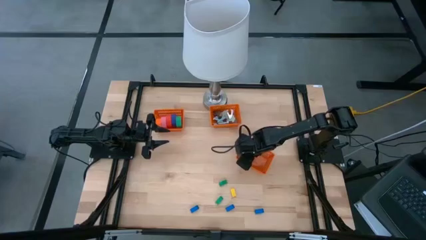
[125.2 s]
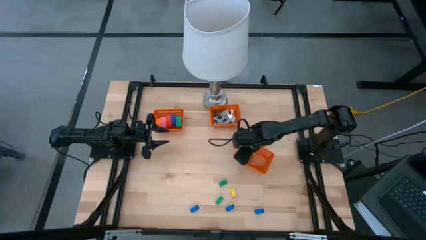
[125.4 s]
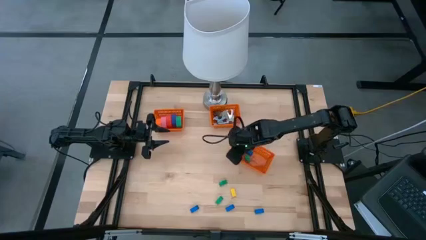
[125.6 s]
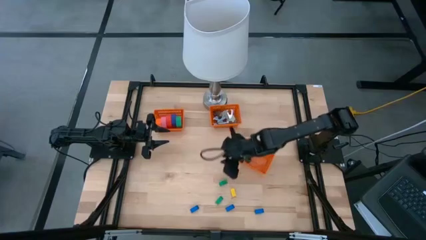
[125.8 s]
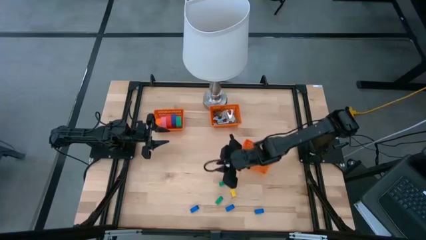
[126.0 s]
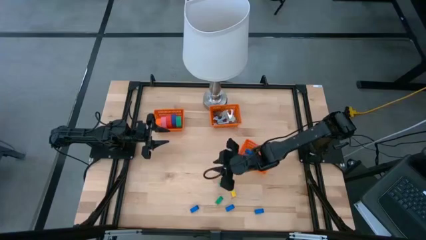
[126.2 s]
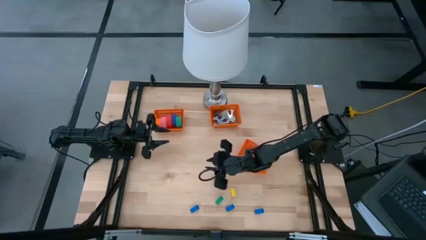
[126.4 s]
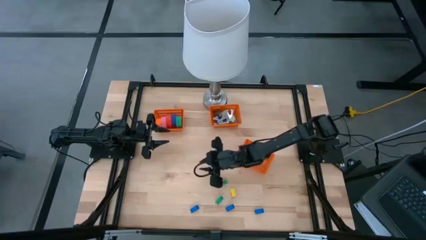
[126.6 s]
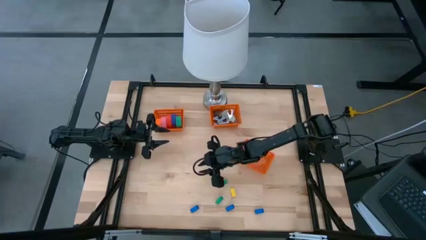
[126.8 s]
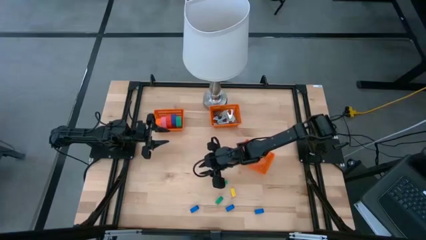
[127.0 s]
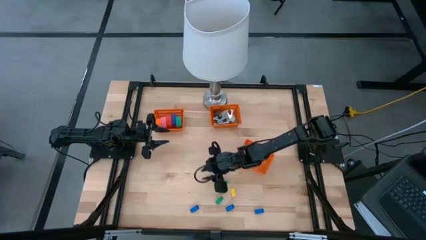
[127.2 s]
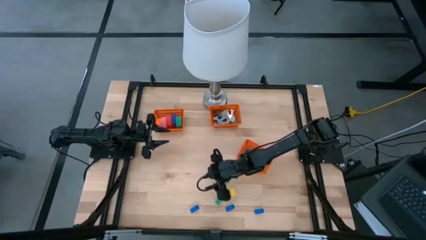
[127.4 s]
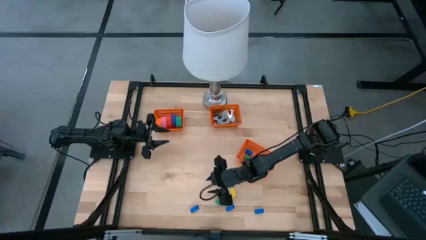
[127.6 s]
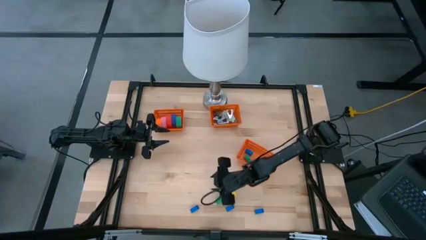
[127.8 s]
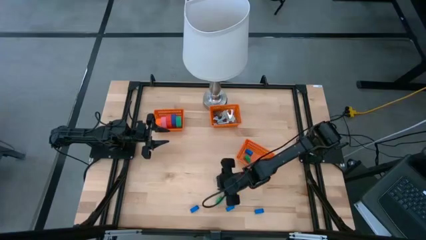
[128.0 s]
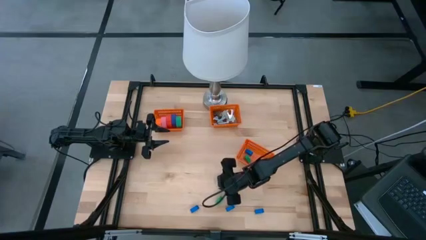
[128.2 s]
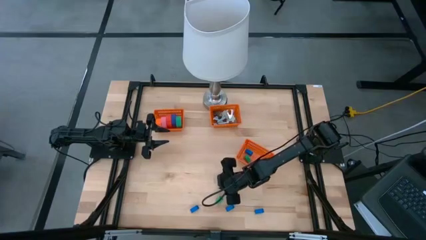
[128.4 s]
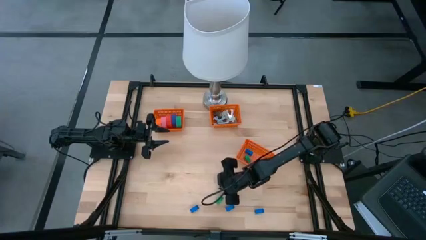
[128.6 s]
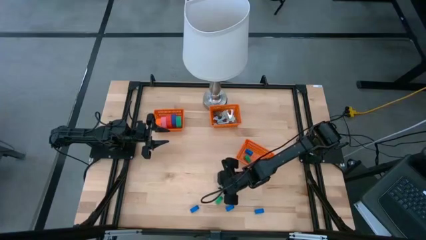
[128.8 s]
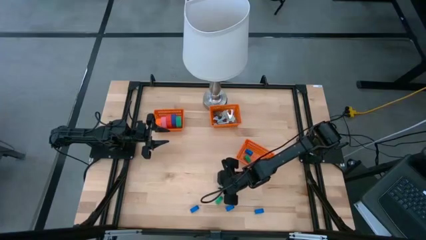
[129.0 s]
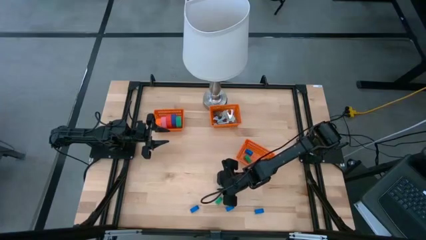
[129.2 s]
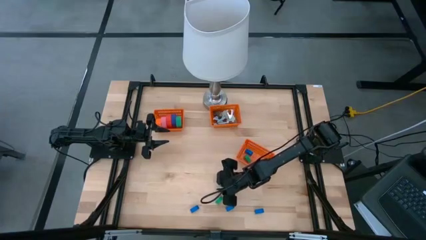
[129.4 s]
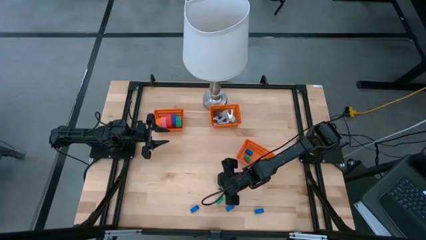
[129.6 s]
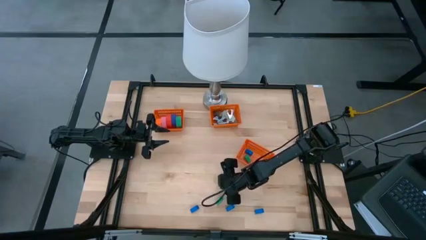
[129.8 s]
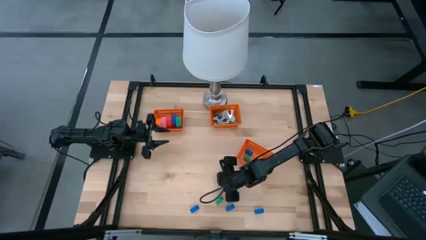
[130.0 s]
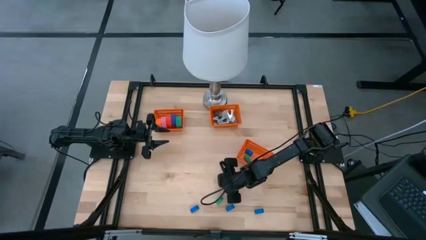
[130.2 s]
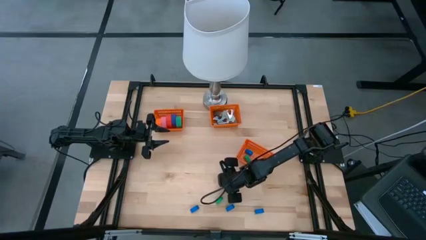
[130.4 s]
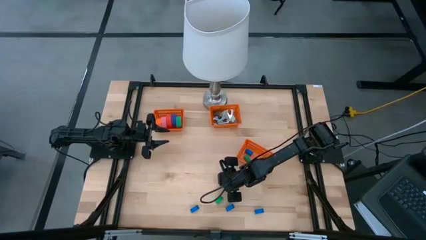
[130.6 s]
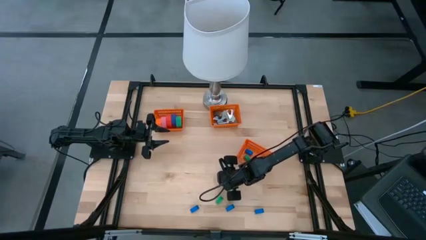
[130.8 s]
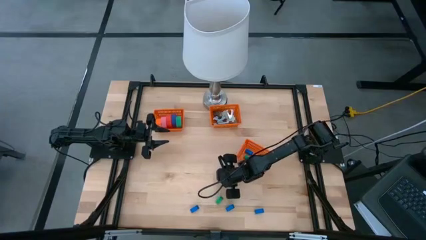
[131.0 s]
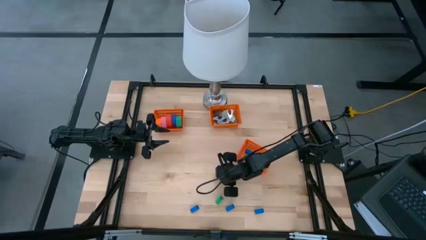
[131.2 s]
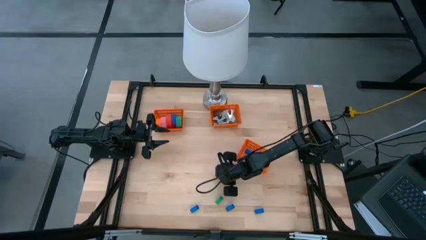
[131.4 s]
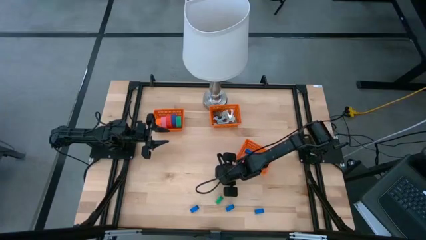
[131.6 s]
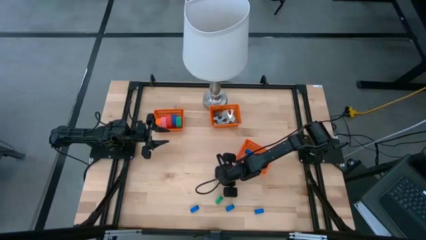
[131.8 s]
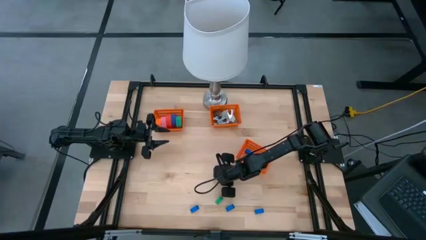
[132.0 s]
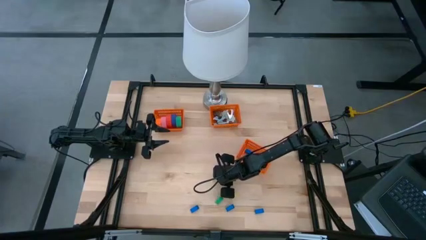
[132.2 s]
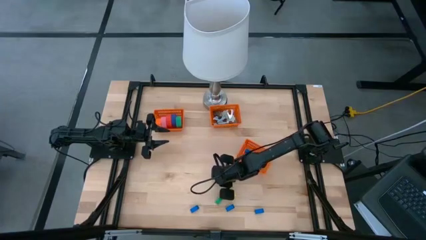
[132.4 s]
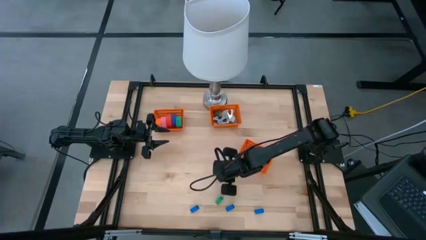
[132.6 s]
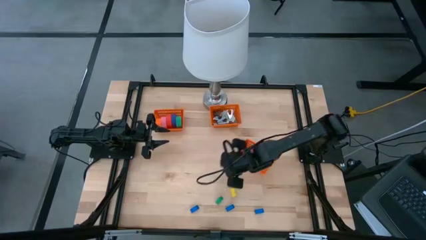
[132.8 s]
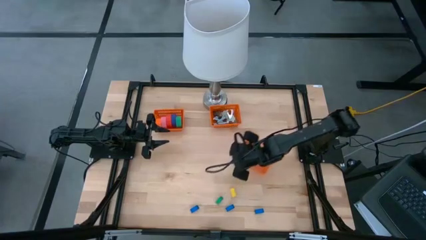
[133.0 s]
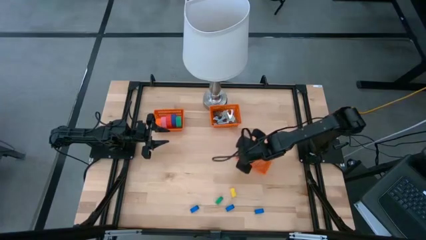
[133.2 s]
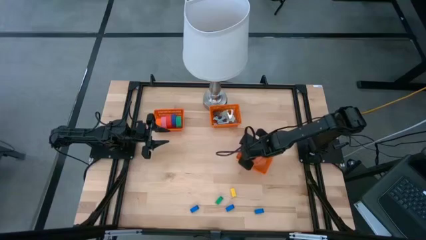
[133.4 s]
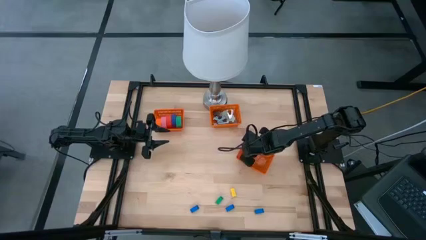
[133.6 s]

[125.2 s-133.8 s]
Task: Pick and place Stapler, Stapler remover, tape
Put the green stapler into the bottom orange bin

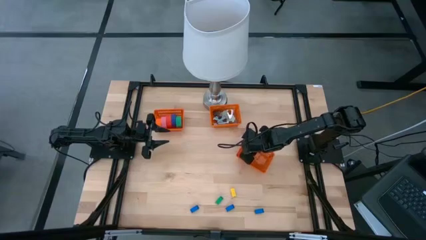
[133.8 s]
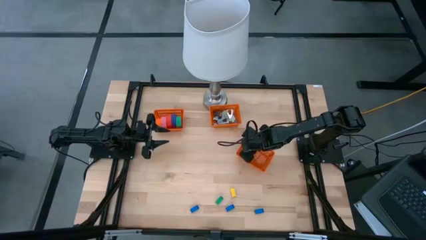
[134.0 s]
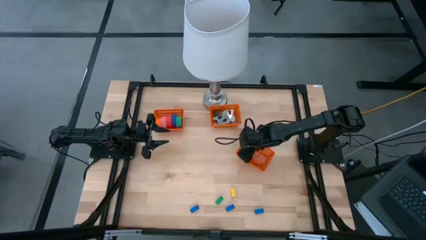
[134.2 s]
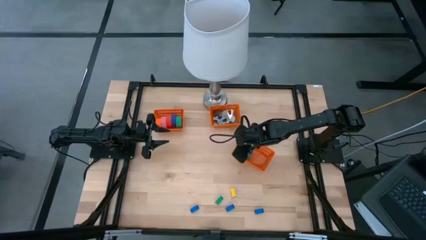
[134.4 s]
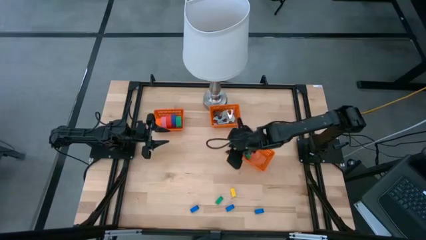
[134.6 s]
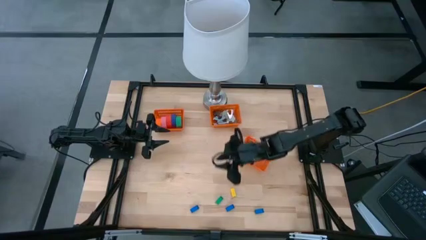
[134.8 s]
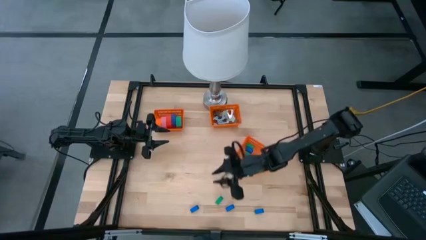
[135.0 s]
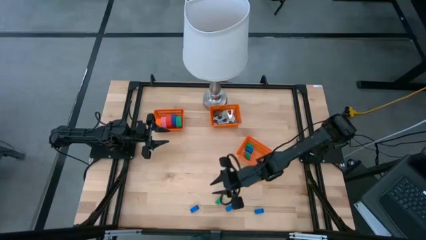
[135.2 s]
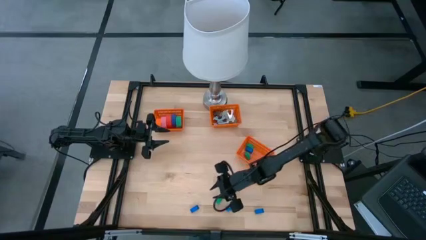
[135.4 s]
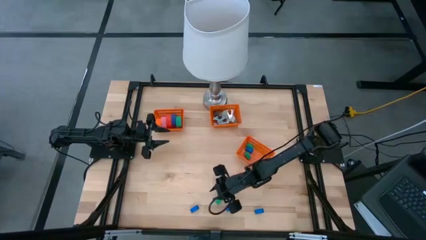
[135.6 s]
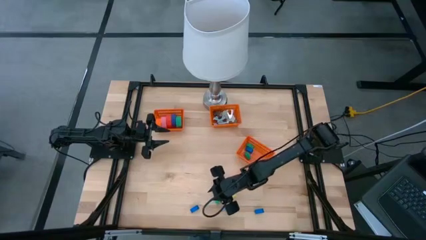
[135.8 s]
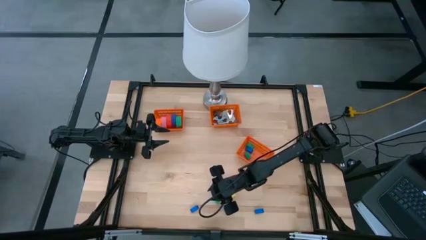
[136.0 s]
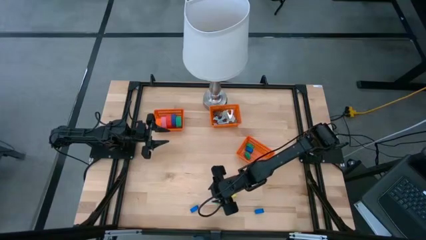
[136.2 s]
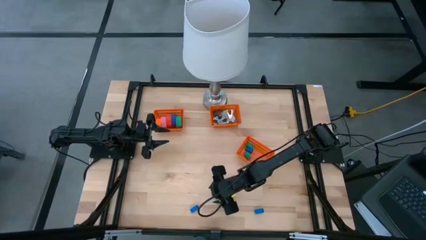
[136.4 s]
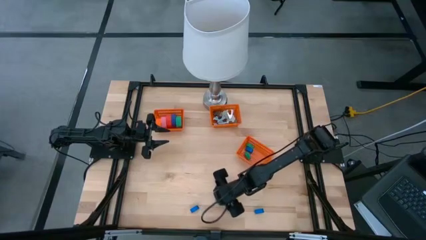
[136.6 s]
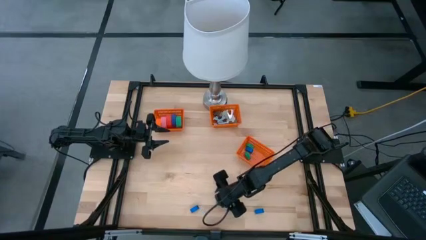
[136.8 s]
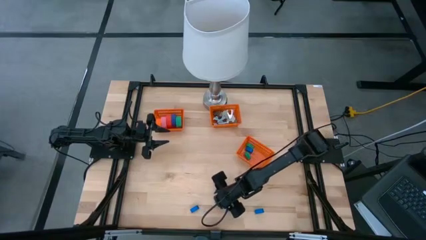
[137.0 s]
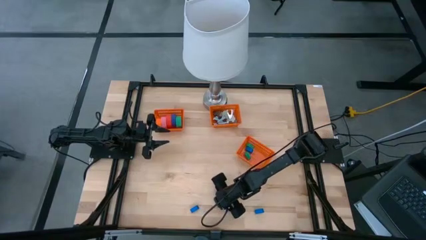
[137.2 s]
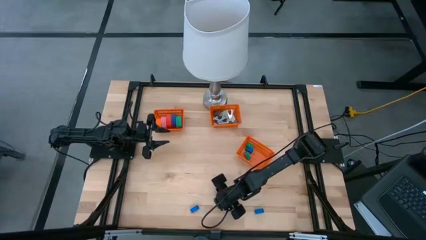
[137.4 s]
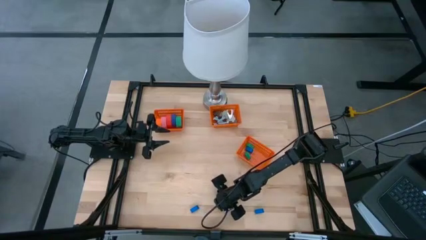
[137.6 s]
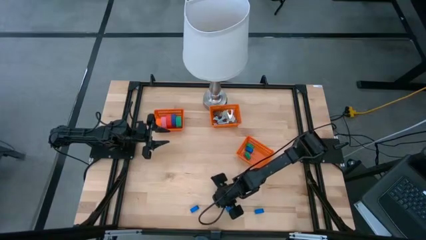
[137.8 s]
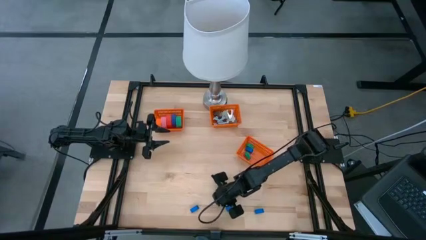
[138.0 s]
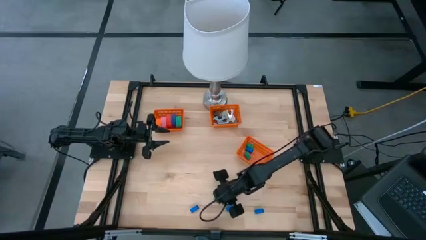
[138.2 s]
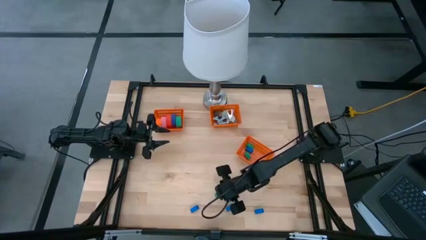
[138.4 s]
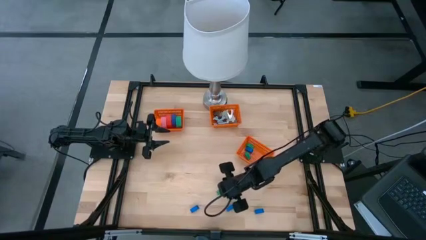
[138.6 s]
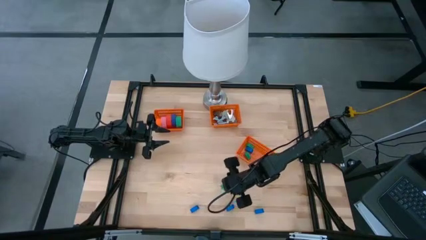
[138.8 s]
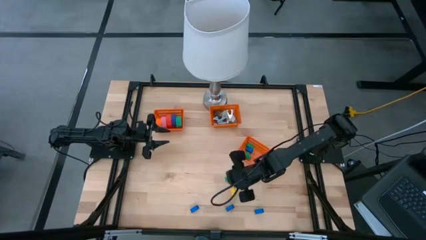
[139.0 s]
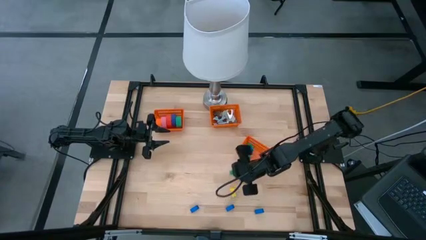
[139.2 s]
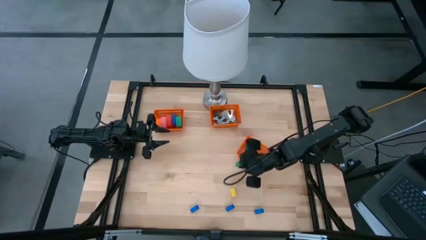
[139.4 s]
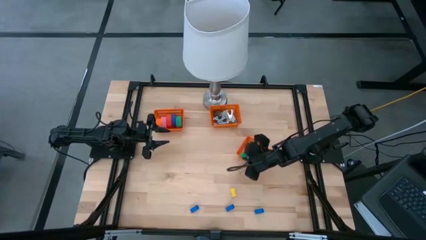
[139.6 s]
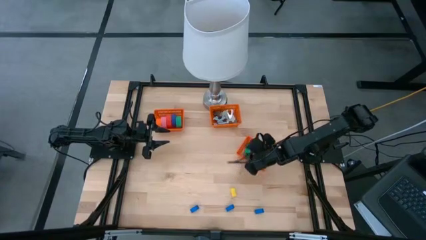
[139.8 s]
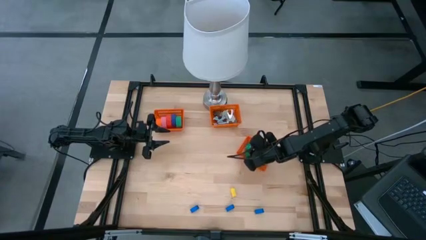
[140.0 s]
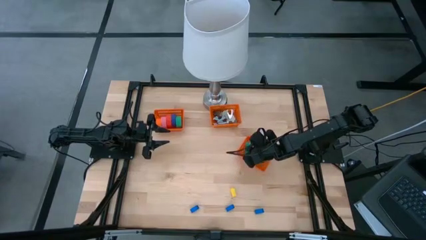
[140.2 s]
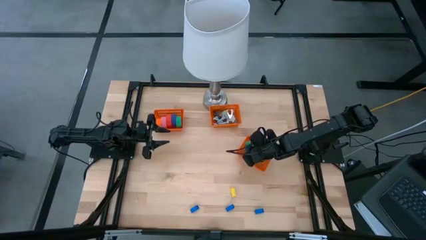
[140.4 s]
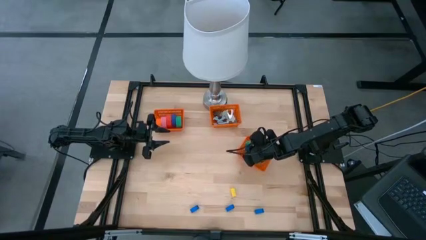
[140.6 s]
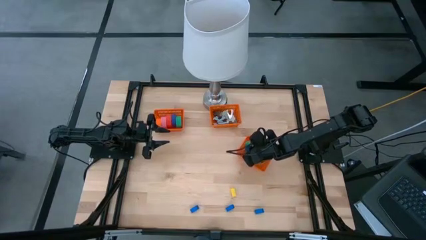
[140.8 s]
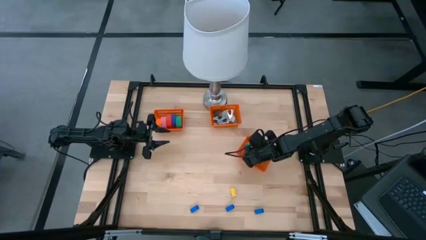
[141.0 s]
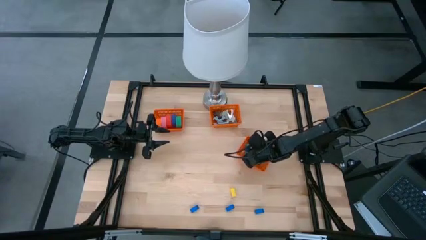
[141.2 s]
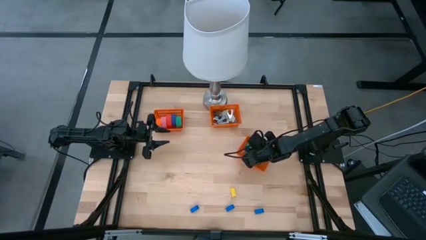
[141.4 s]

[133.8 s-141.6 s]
Put the green stapler into the bottom orange bin
